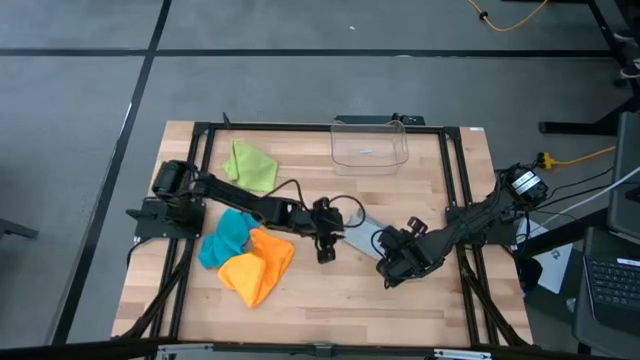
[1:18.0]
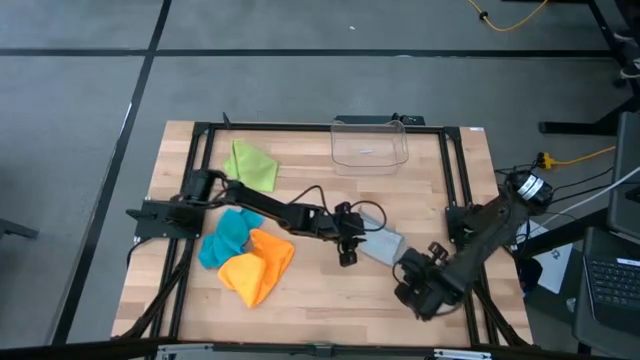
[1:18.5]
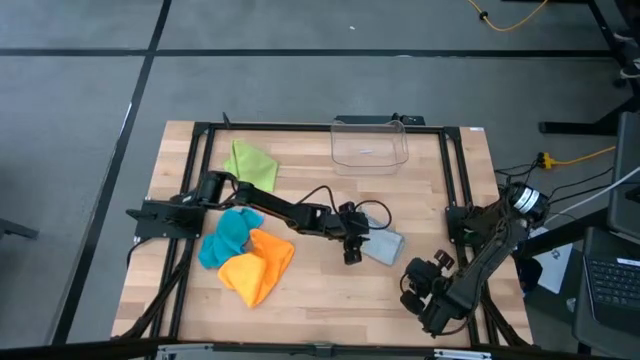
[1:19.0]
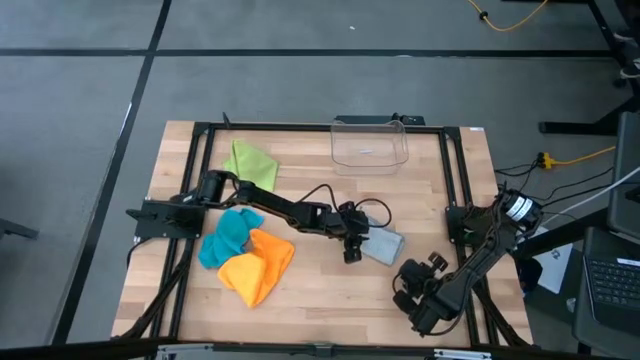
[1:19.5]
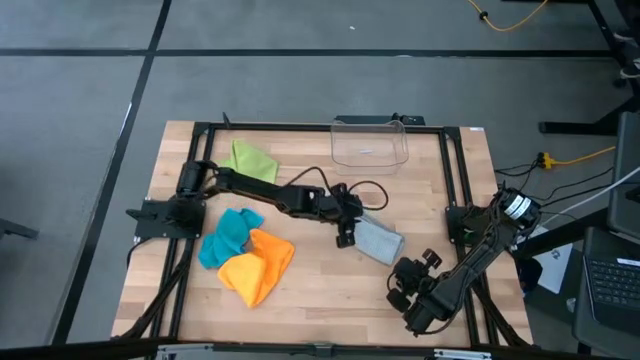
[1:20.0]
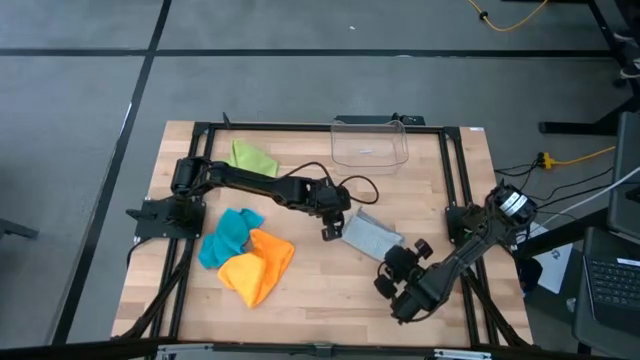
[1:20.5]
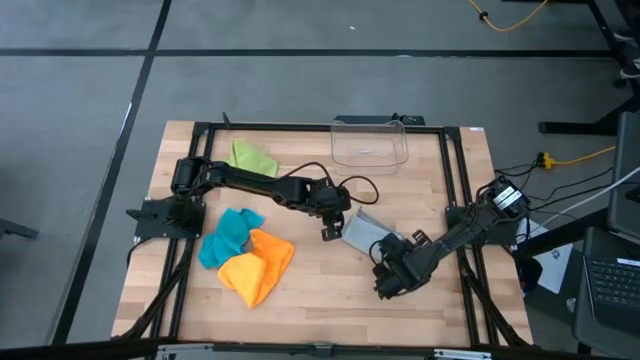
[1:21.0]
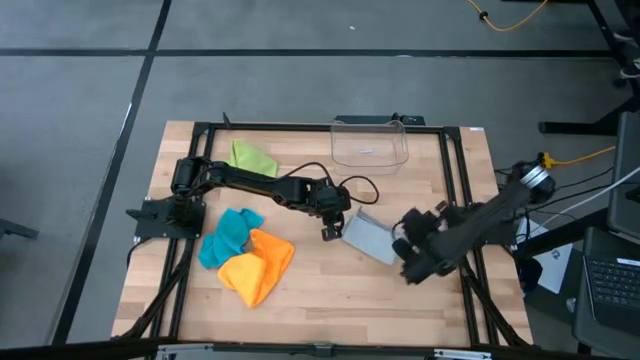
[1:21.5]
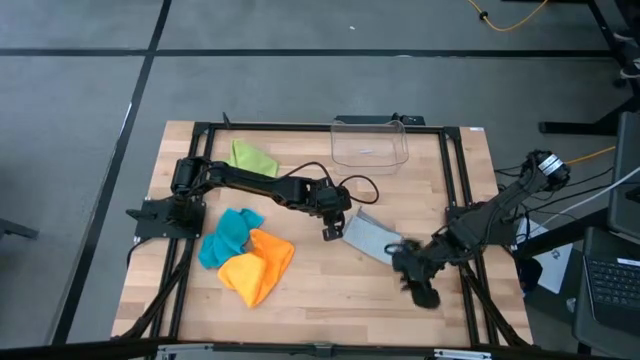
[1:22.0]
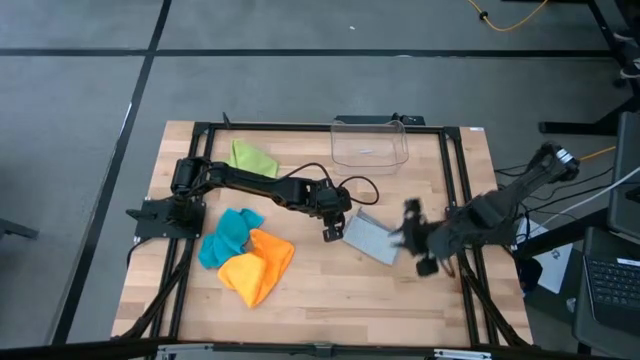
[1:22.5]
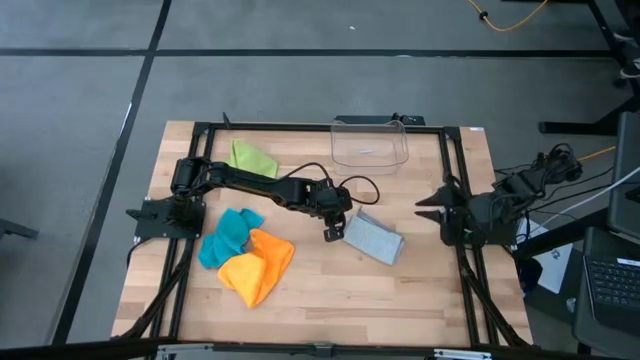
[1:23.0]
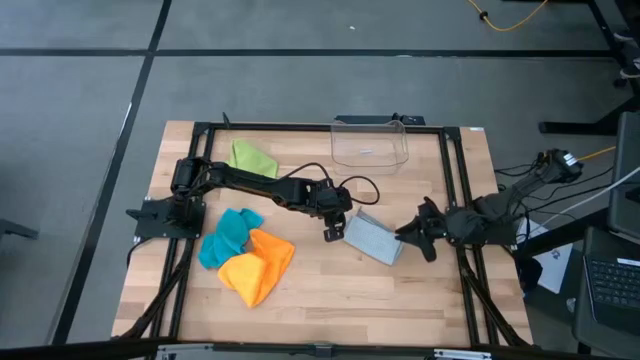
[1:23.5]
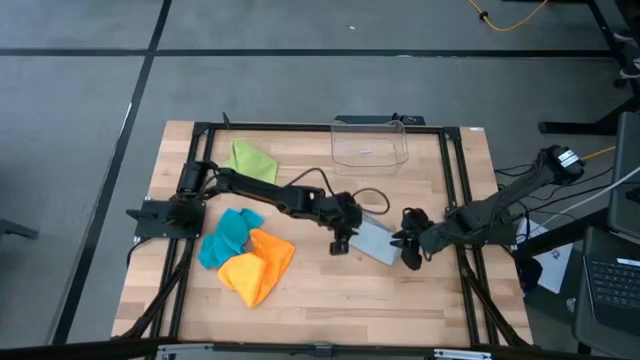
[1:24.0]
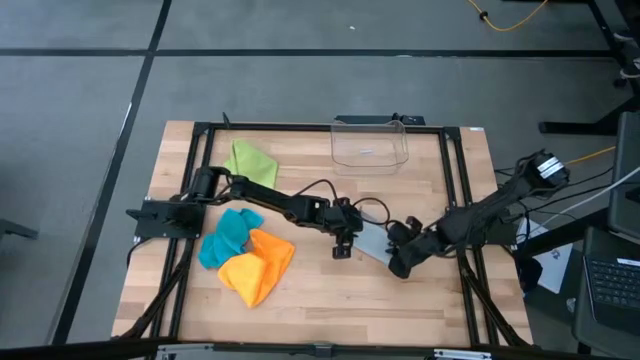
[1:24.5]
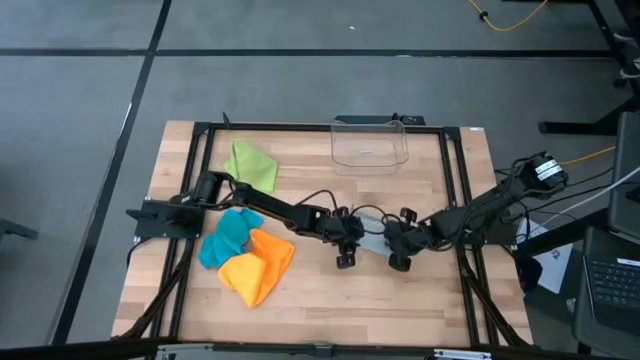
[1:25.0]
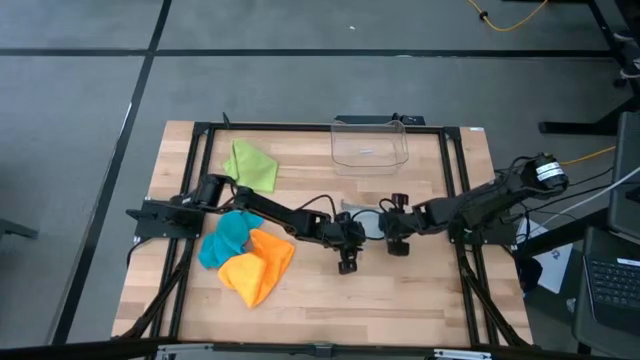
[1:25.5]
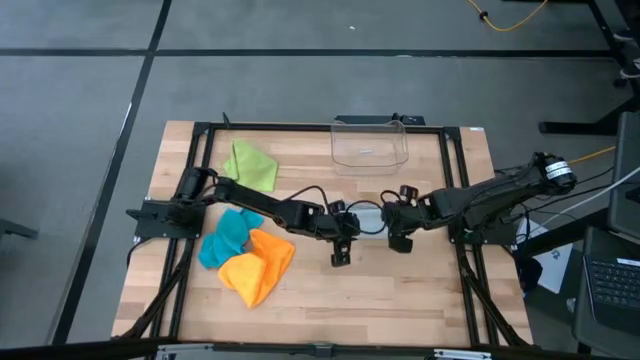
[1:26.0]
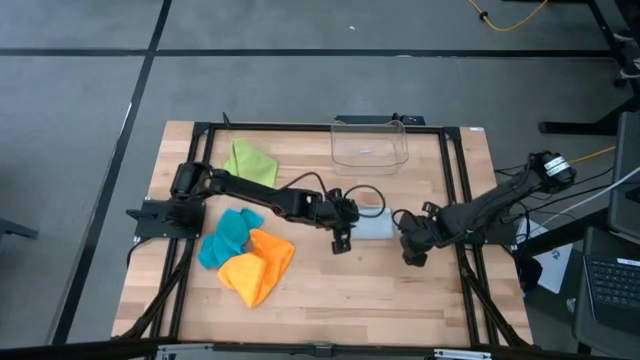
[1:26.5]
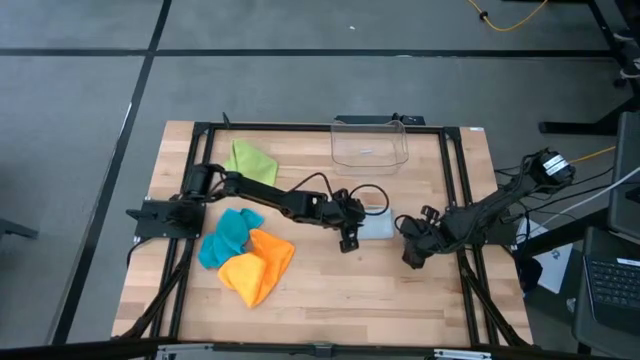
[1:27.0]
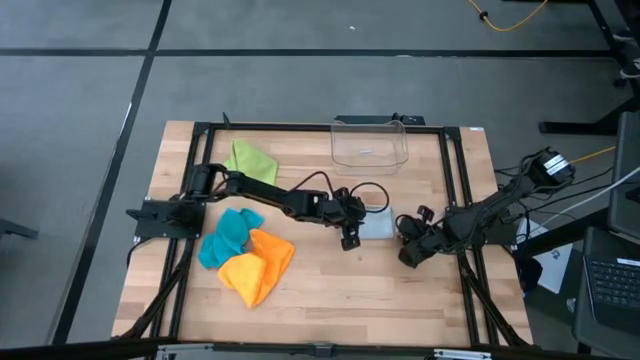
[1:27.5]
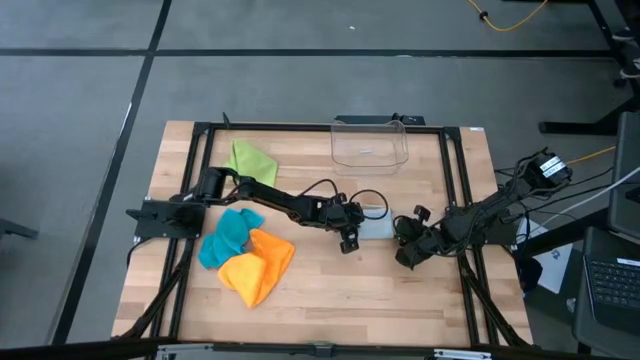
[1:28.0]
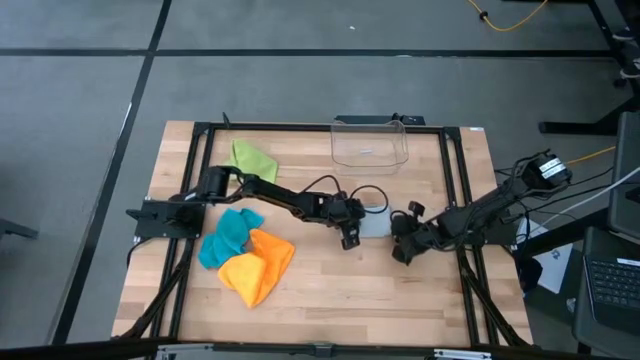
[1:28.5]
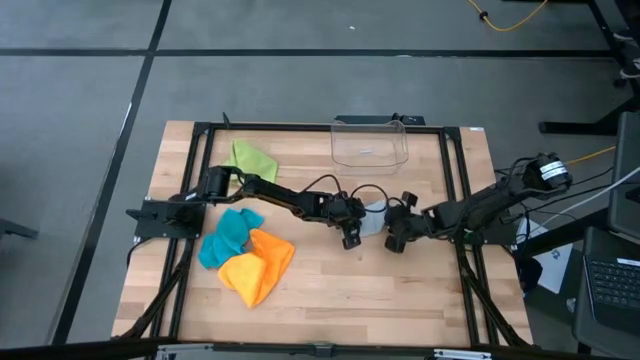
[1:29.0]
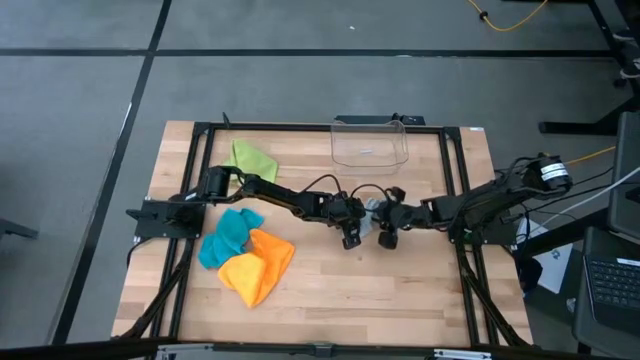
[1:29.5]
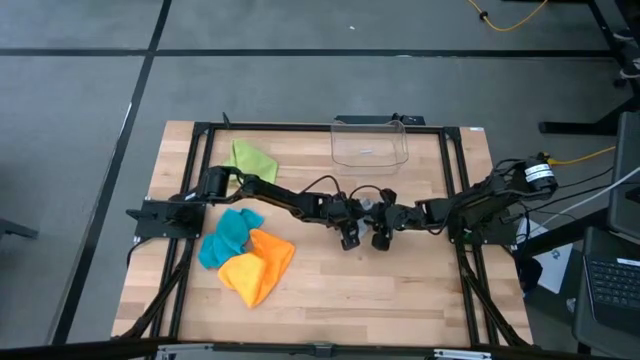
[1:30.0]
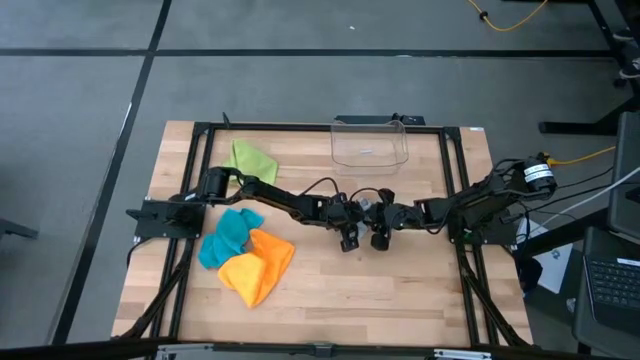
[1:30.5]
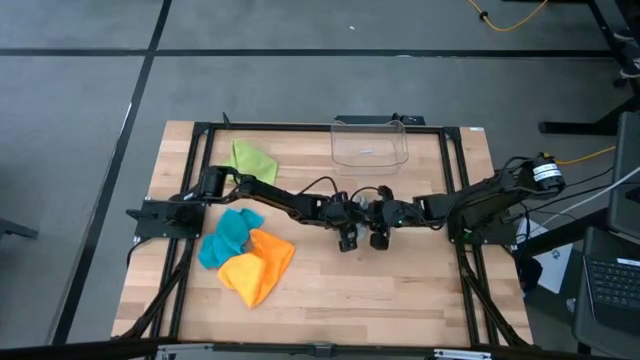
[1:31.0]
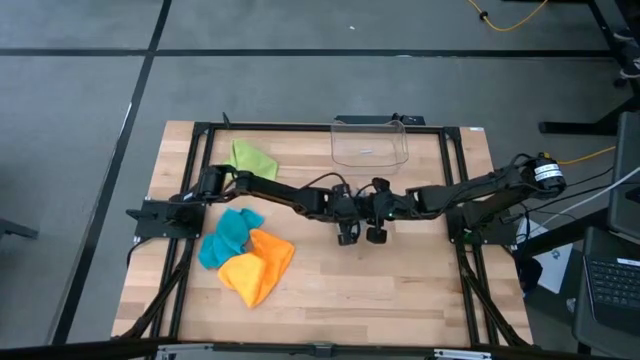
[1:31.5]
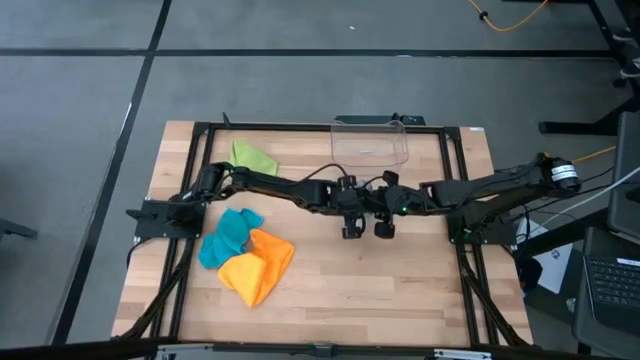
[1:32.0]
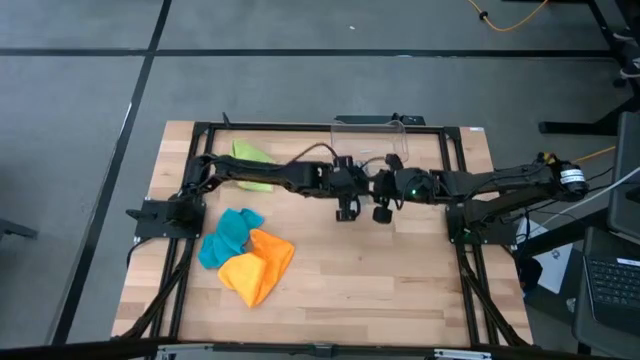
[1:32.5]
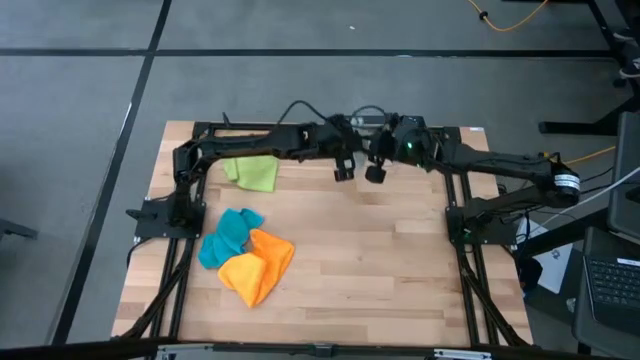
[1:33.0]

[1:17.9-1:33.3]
Task: Fold microfiber towels
Put the folded gray microfiber into the transparent bin

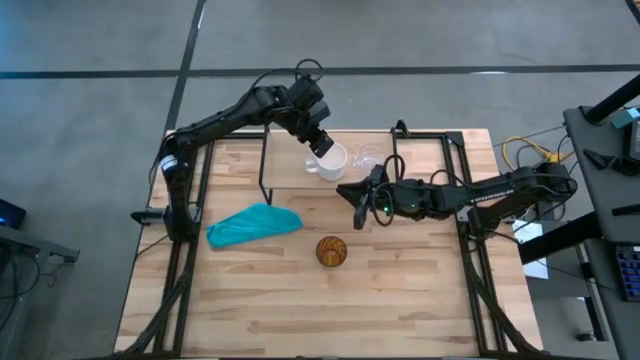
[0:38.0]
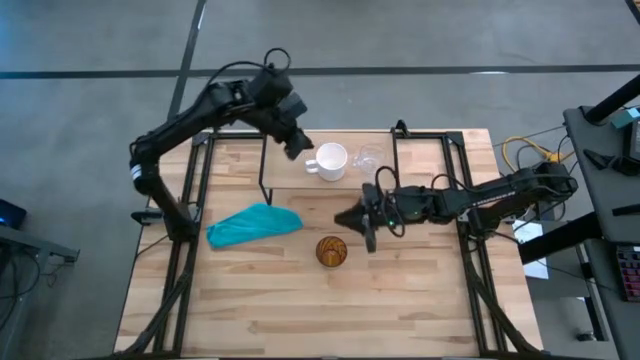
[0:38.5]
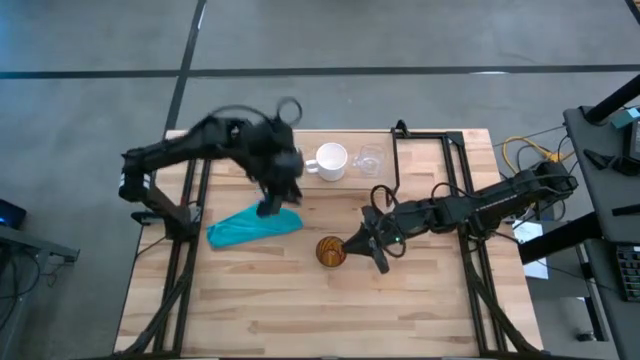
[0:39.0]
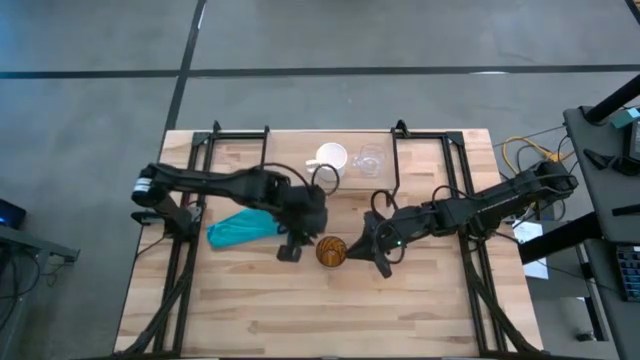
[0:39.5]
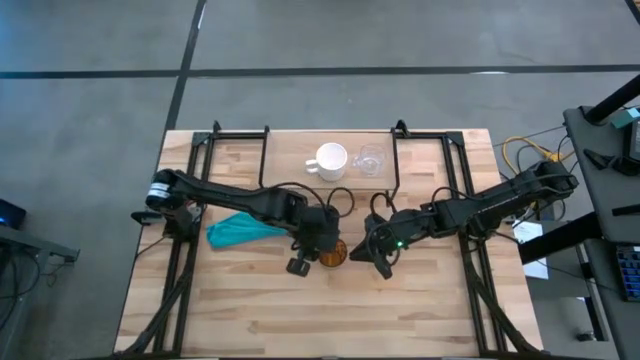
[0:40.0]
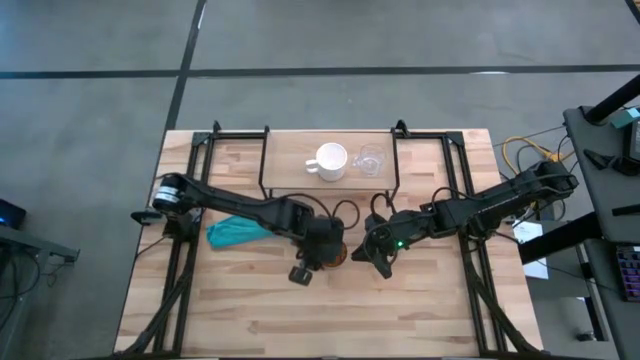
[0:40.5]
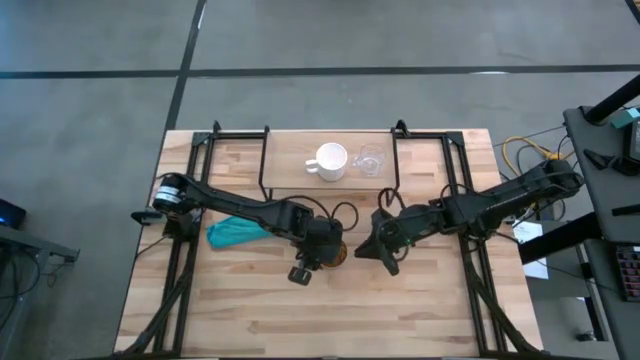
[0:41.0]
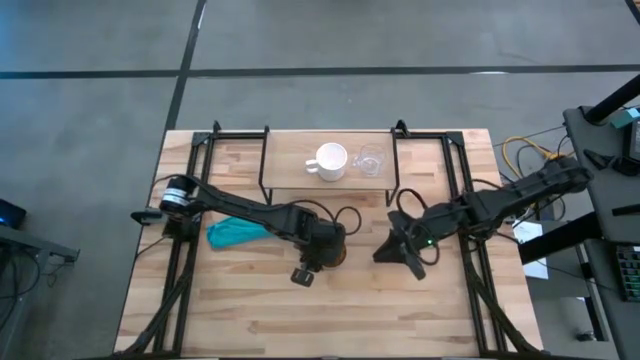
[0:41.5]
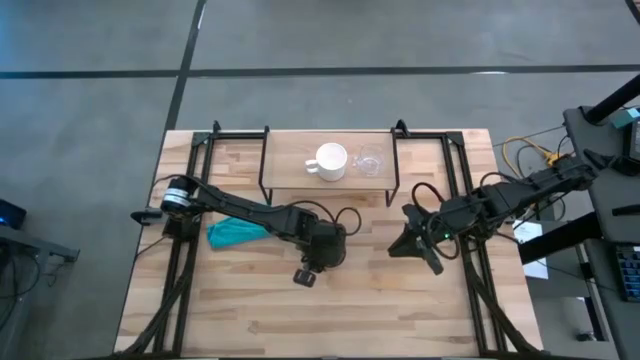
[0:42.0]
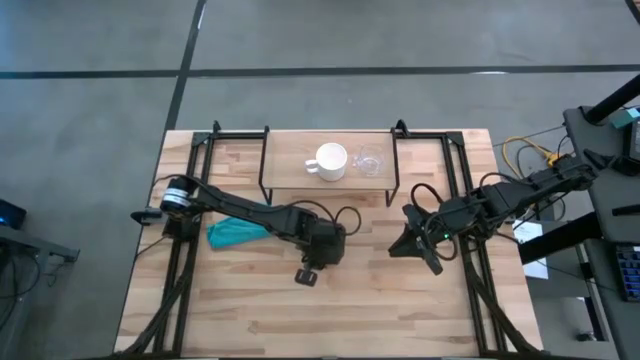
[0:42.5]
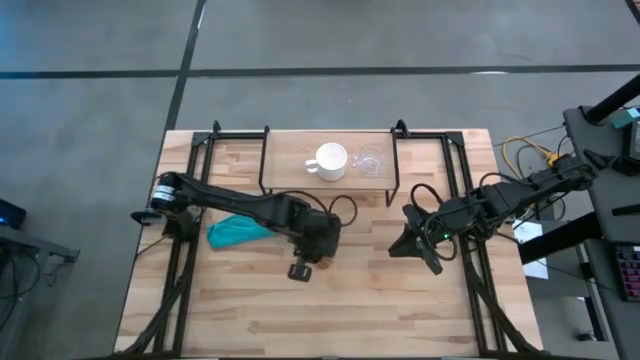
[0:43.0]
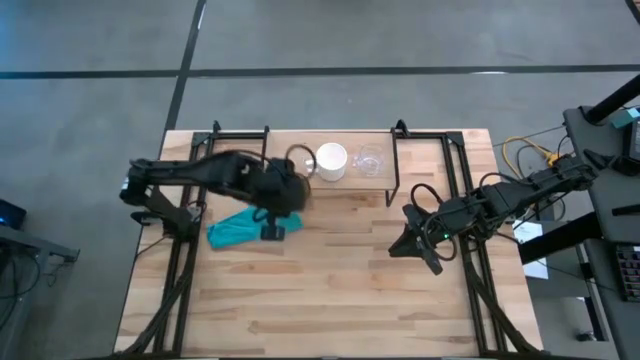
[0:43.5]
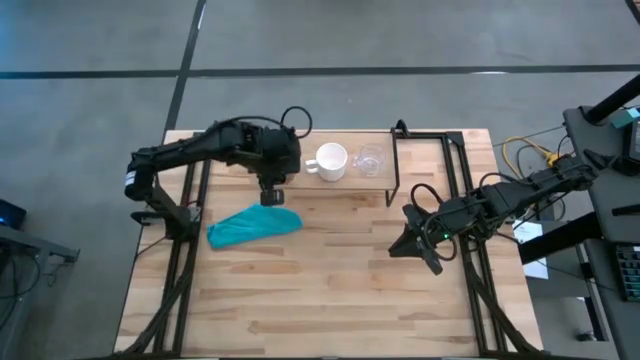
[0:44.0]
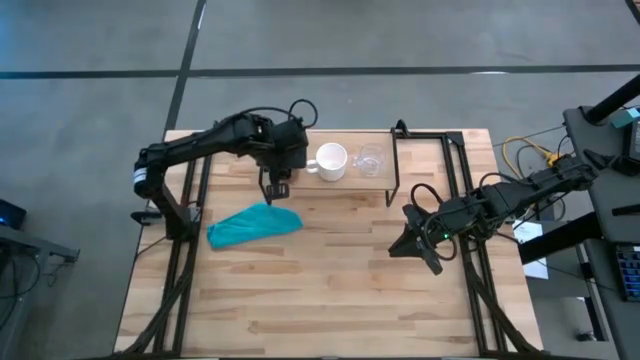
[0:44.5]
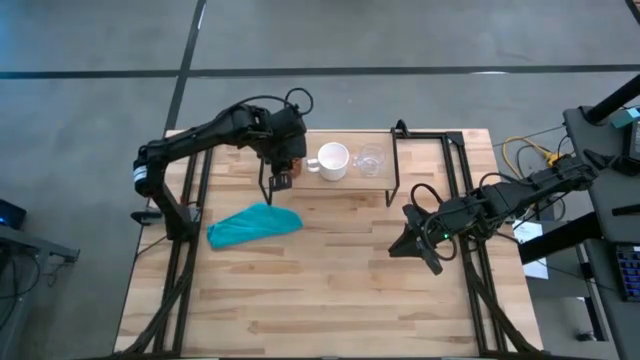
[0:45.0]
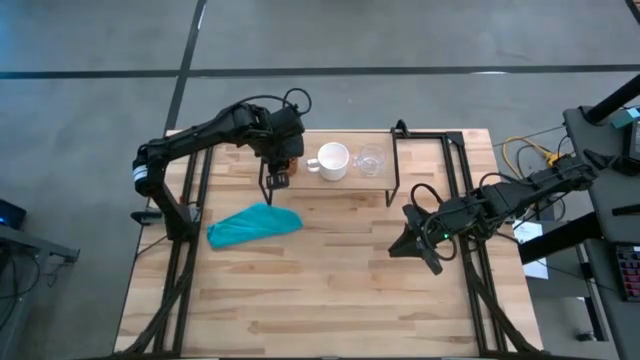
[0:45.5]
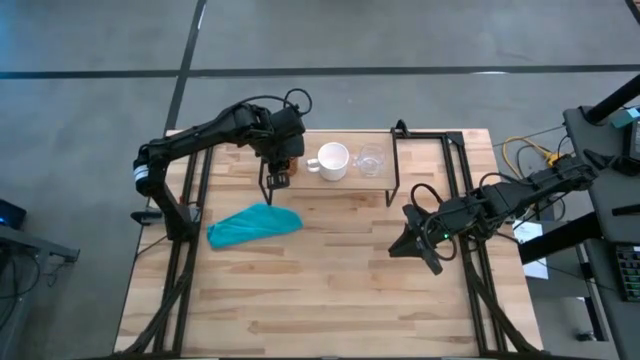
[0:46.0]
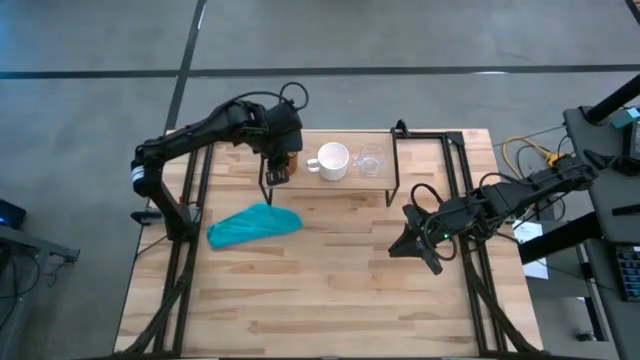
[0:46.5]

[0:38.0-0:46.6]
Task: Stack small to large cups/mugs on shelf
Put the orange cup on the shelf
